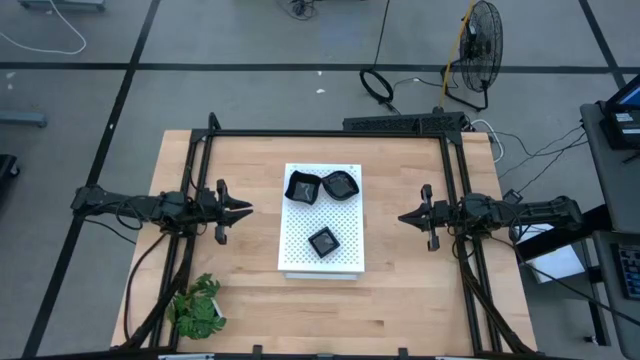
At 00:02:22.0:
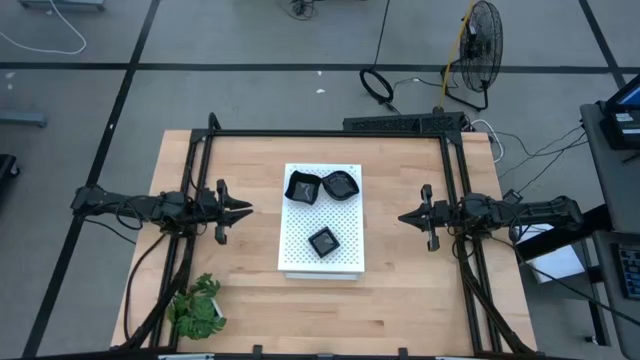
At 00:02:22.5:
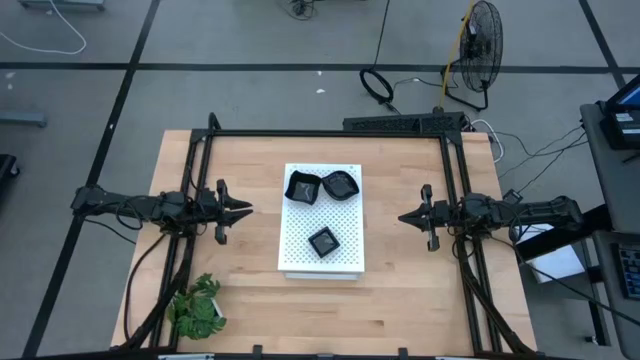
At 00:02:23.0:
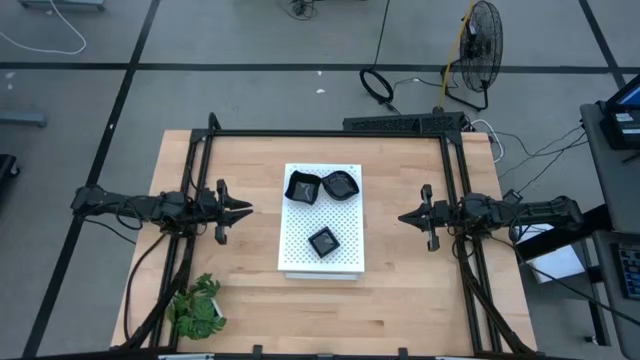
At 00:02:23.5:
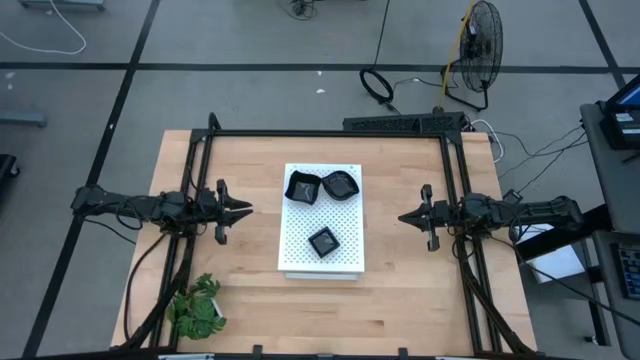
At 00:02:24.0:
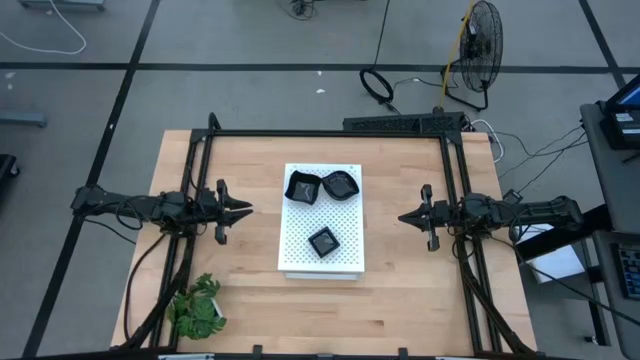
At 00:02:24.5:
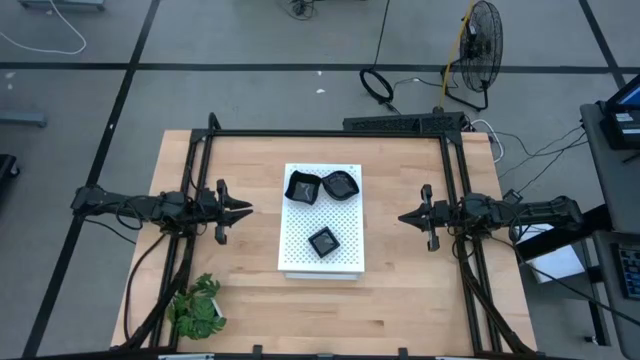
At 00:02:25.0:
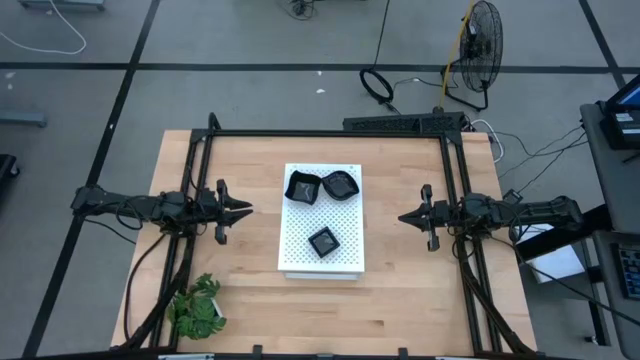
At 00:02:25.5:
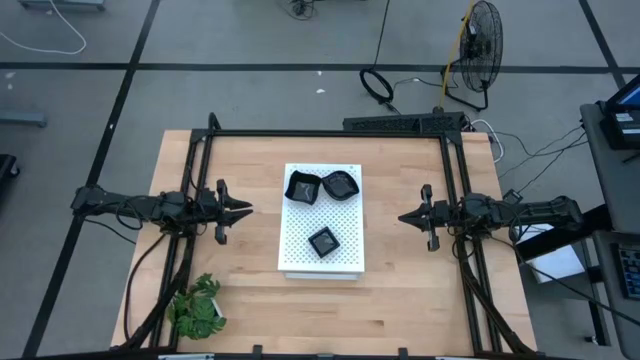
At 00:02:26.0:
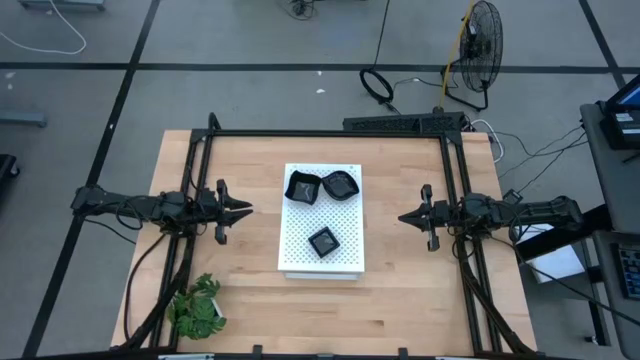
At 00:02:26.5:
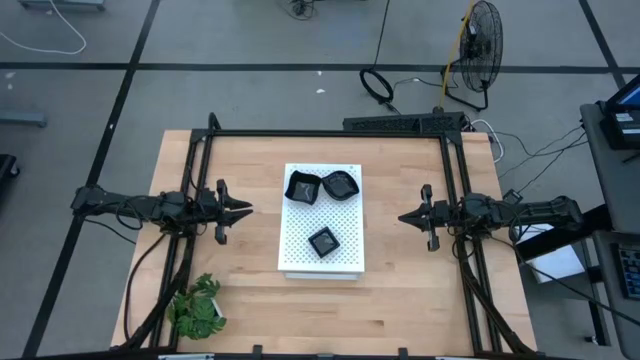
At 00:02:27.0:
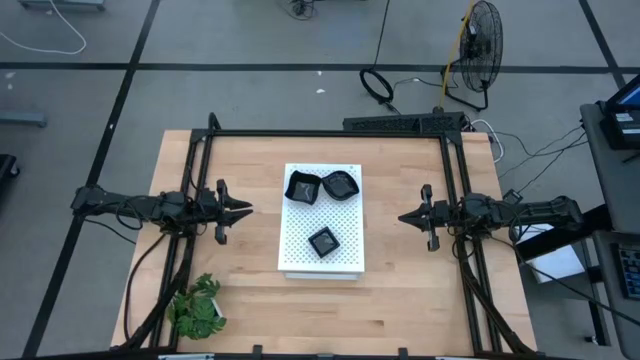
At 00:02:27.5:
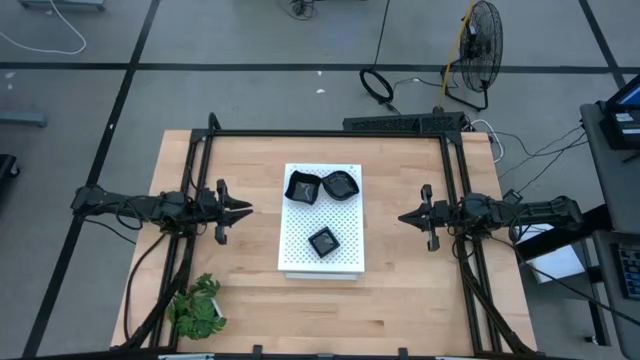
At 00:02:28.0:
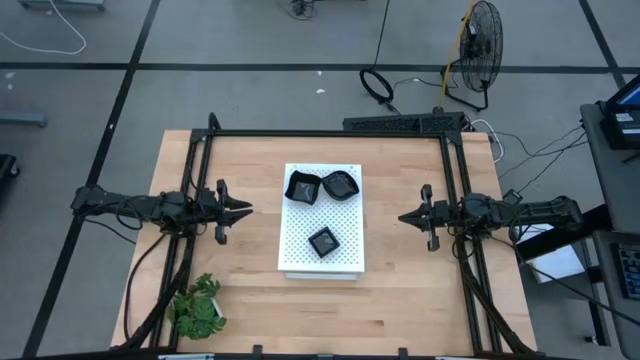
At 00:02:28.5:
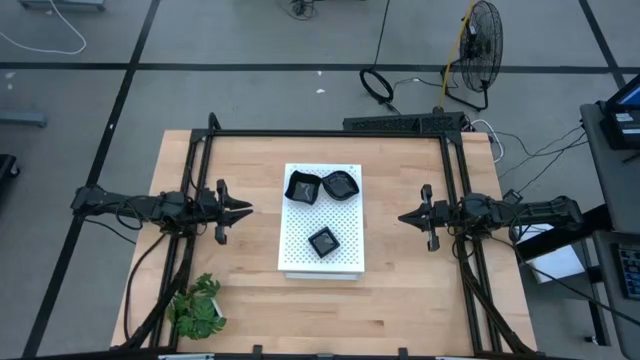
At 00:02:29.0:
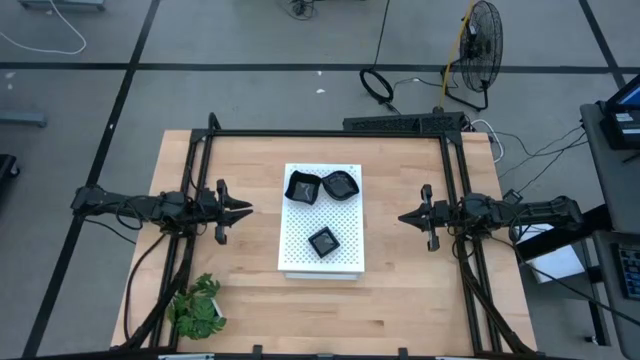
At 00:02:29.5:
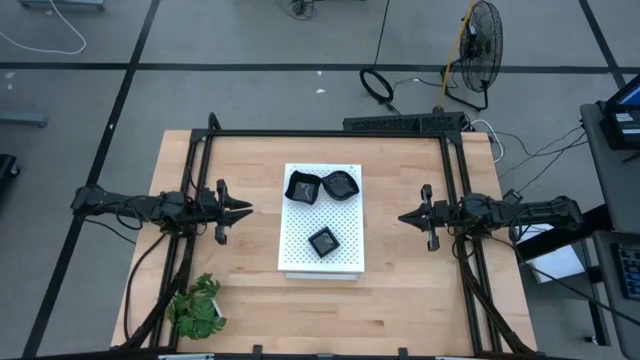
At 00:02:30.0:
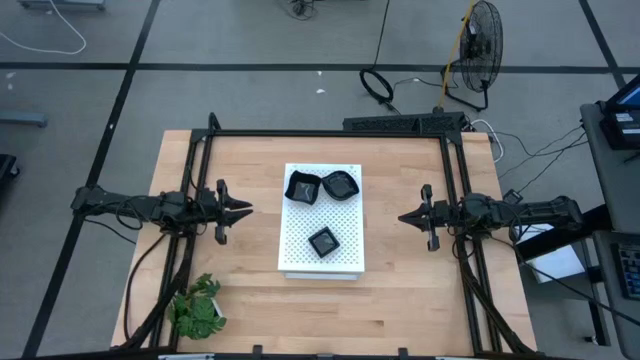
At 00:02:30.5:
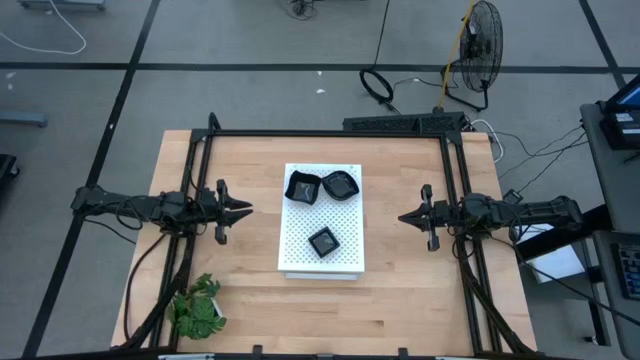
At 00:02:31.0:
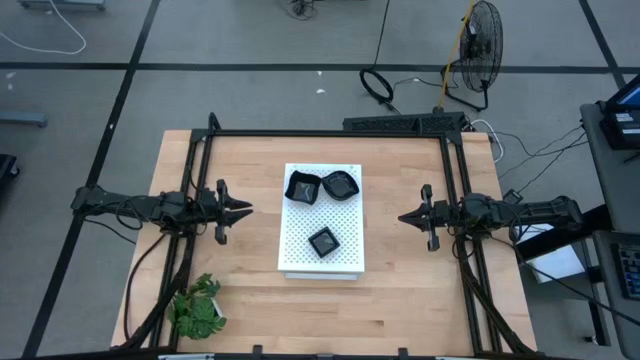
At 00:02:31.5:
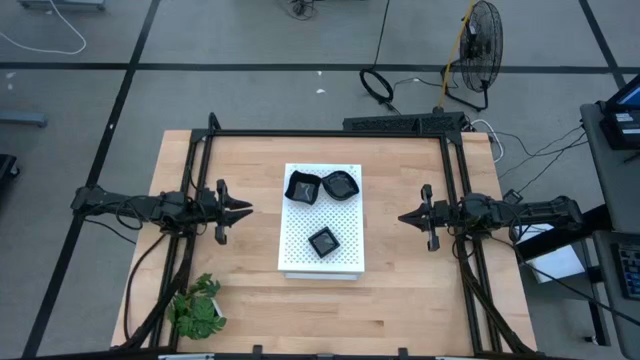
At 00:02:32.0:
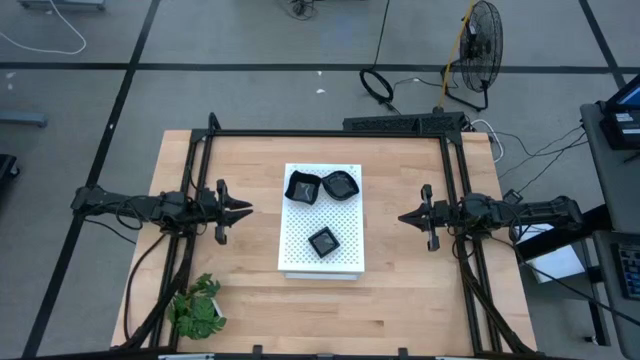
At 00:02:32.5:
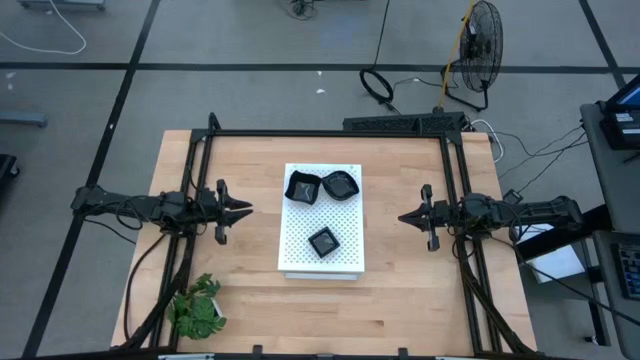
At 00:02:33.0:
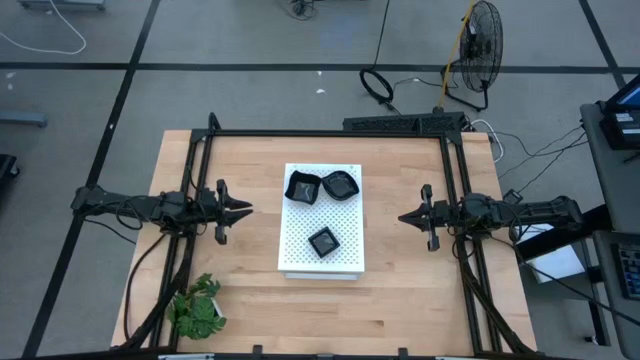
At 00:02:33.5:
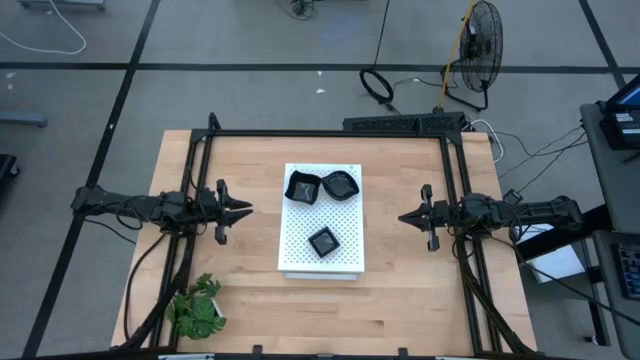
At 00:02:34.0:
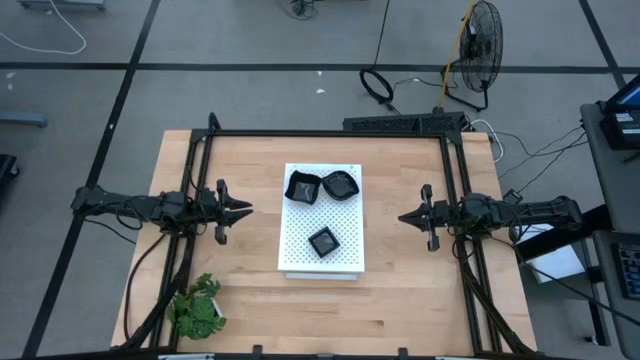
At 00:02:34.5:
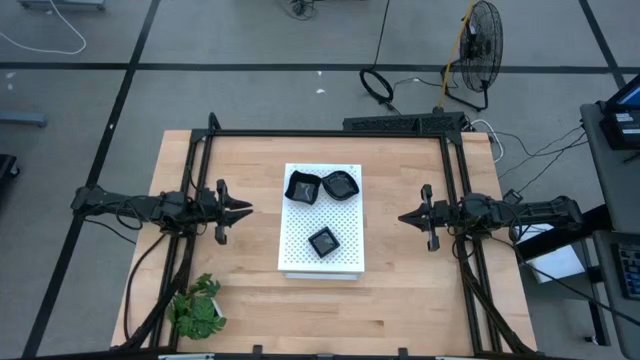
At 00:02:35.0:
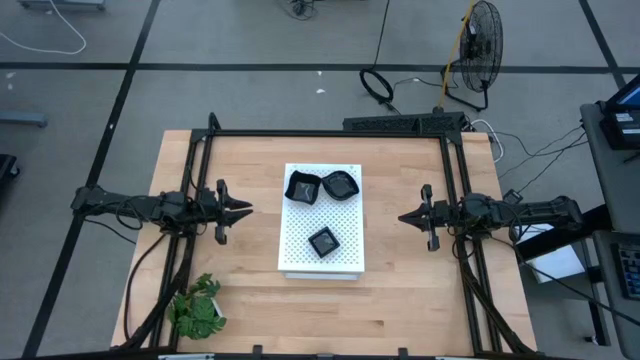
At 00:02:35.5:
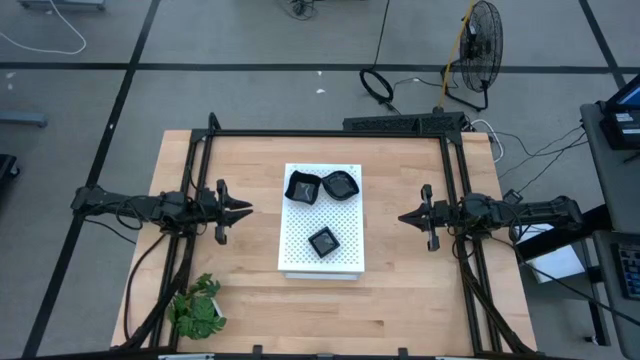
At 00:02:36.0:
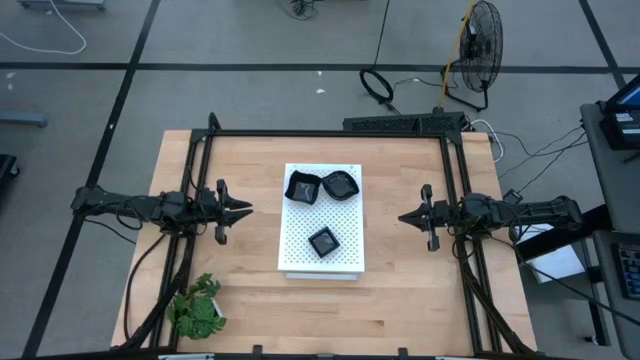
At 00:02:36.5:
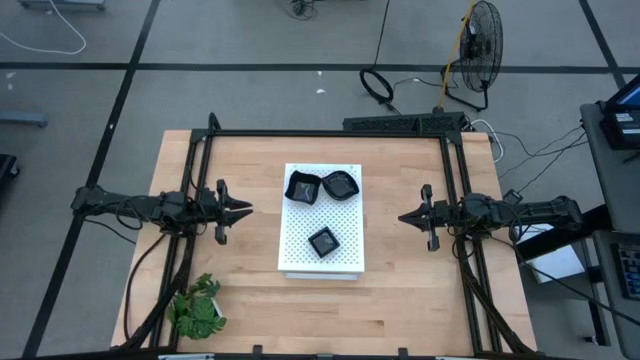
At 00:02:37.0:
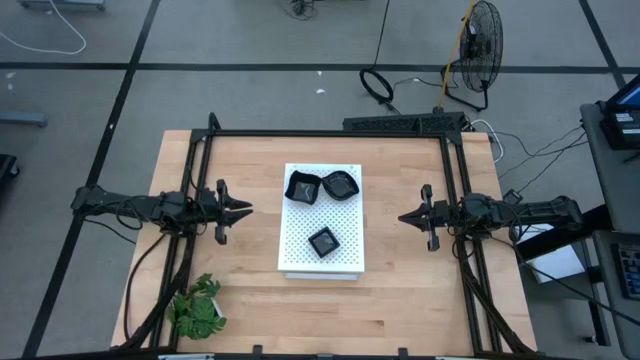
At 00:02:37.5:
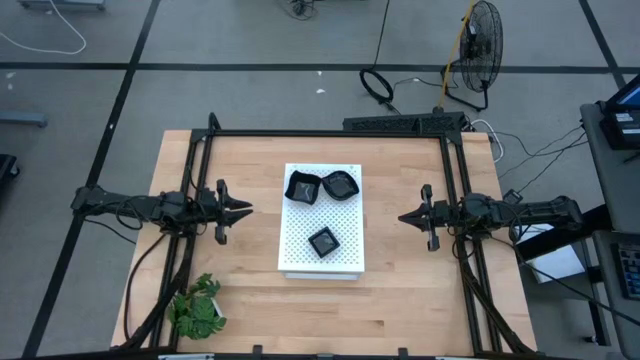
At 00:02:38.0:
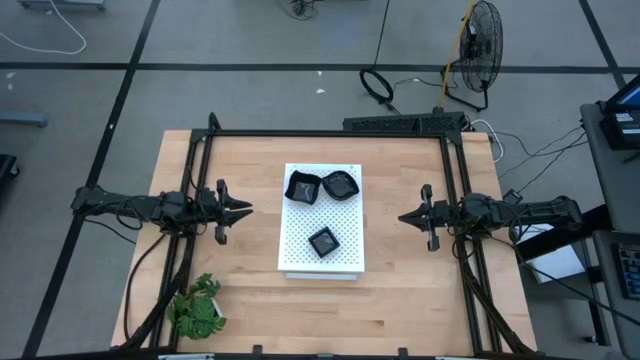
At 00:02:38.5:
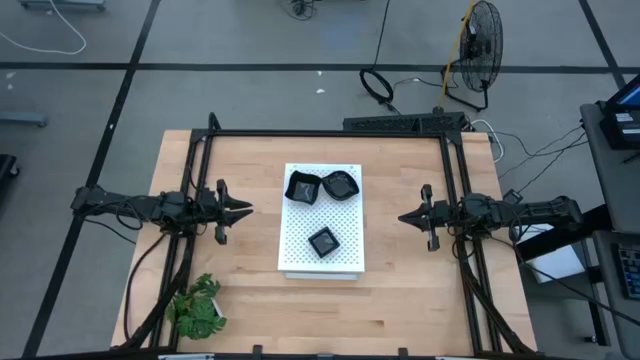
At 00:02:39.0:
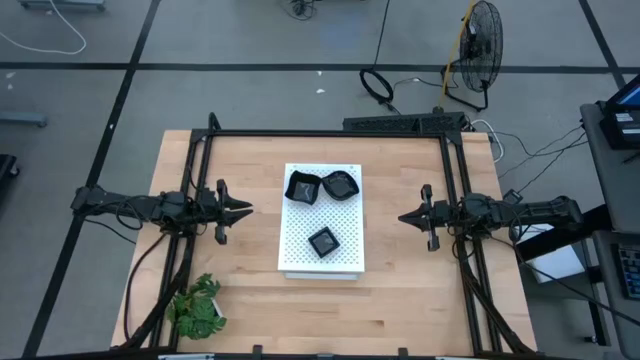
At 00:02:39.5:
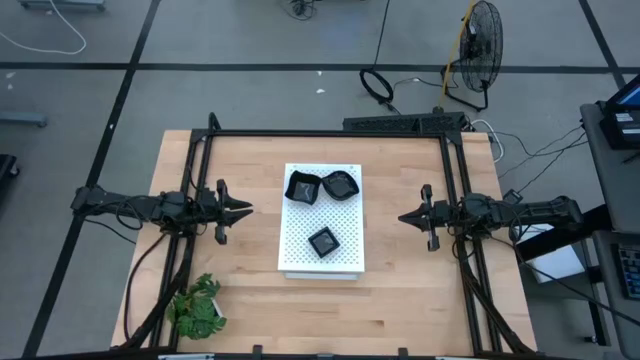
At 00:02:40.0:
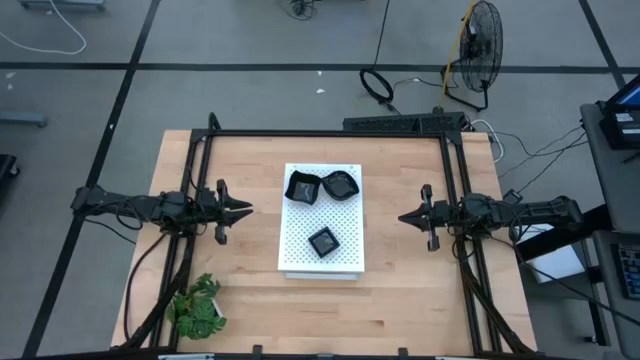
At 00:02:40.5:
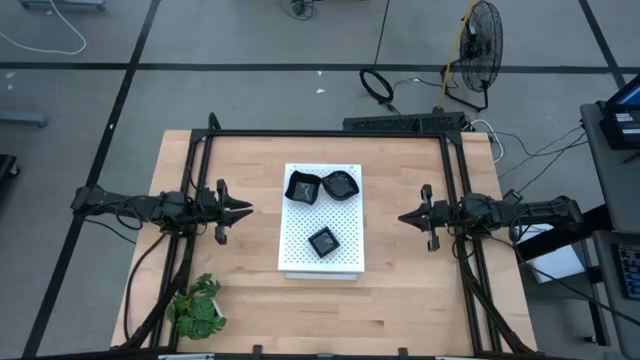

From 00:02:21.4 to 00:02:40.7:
Task: Pick & Place Mini shaped plates
Return to Home Position
